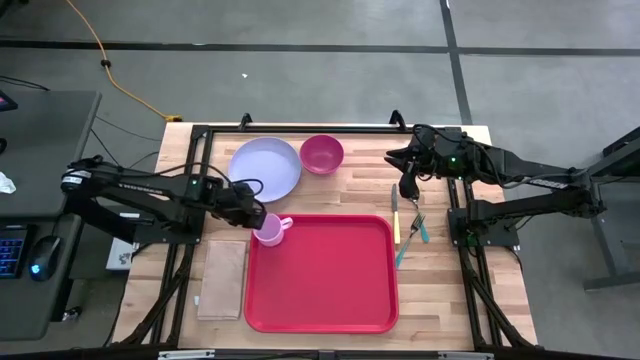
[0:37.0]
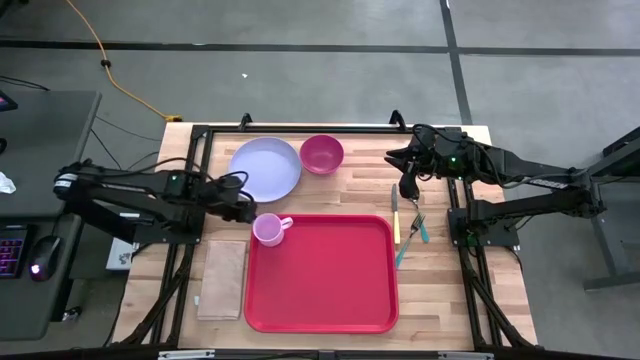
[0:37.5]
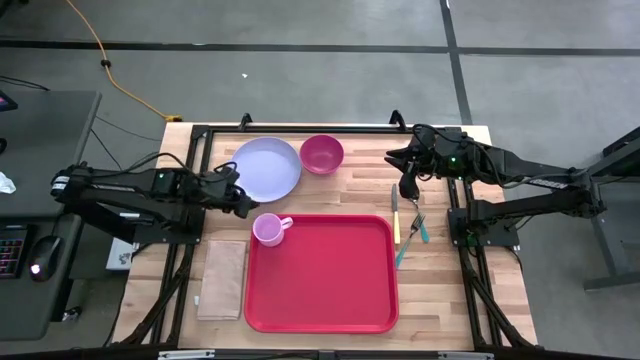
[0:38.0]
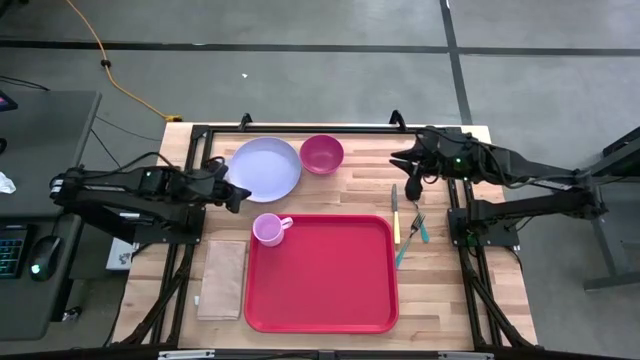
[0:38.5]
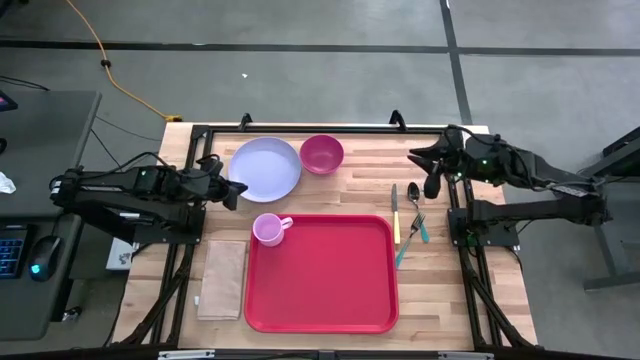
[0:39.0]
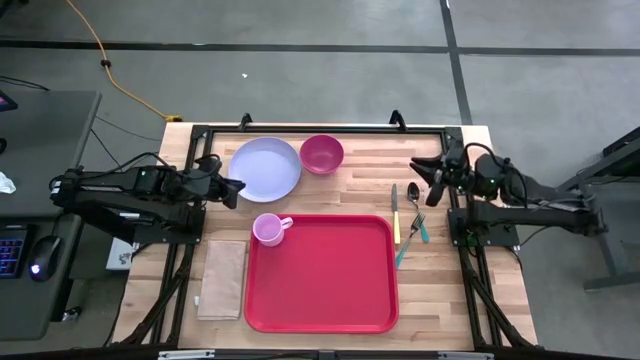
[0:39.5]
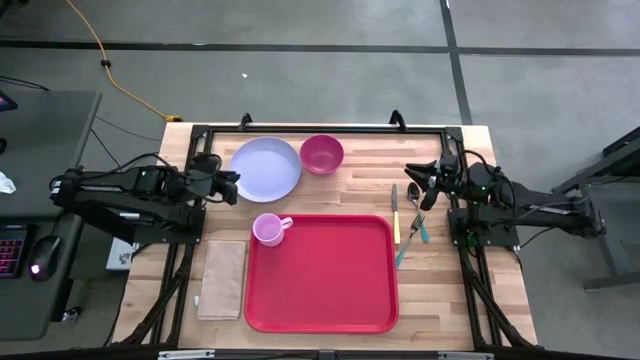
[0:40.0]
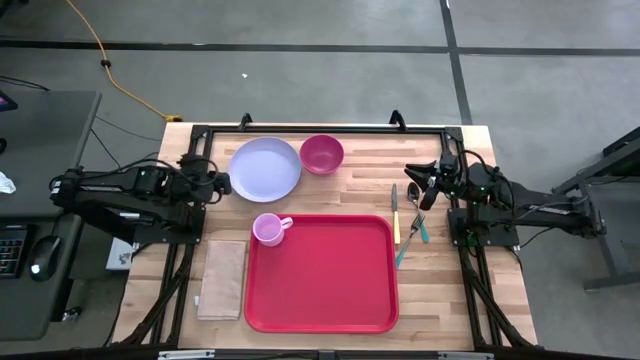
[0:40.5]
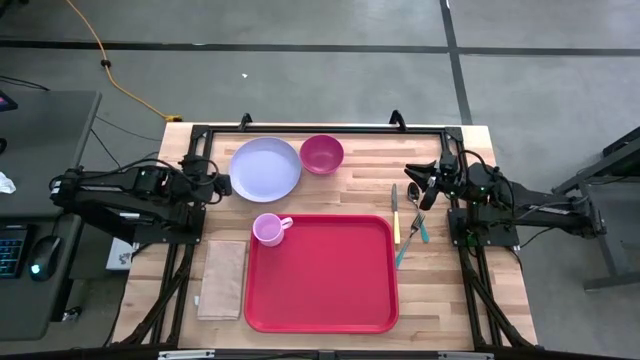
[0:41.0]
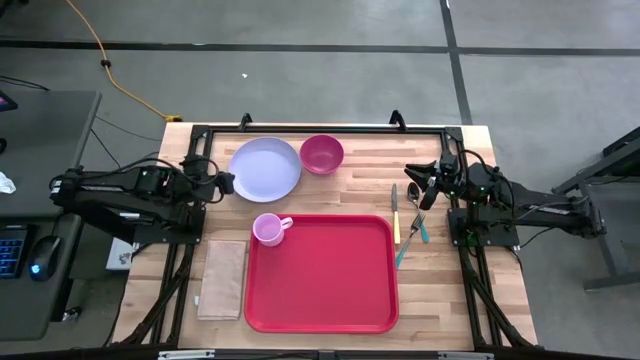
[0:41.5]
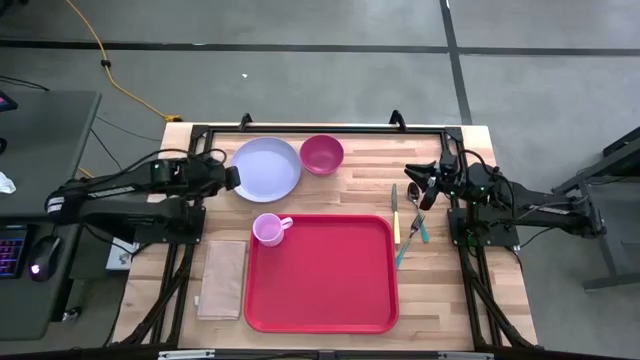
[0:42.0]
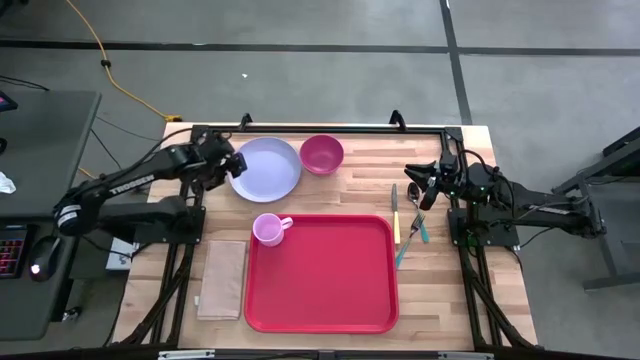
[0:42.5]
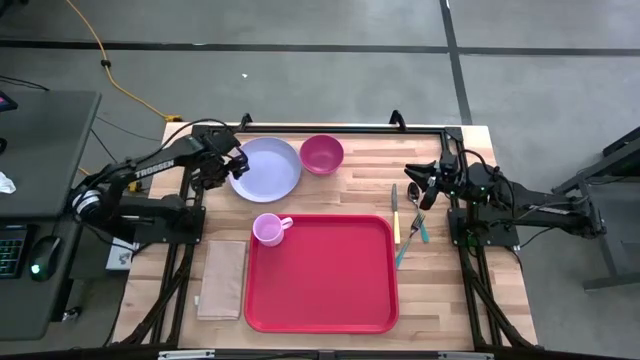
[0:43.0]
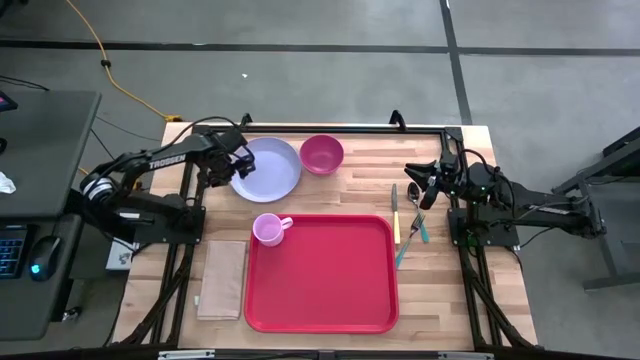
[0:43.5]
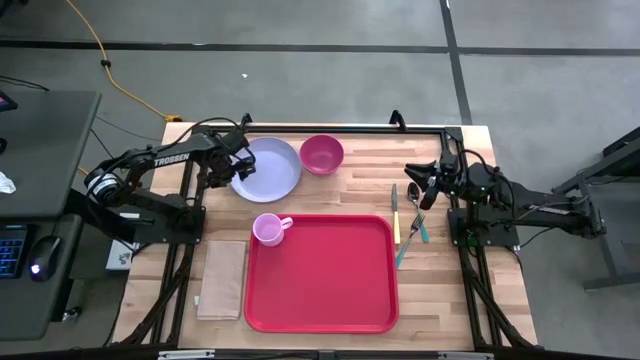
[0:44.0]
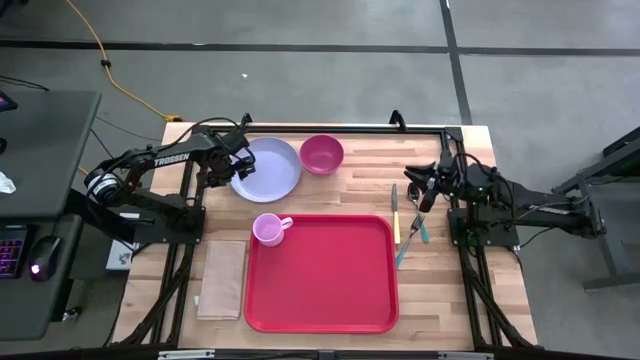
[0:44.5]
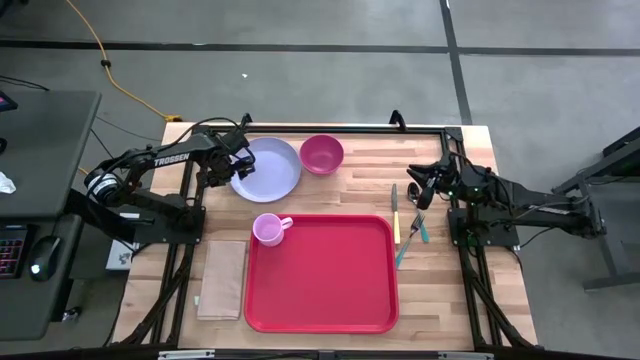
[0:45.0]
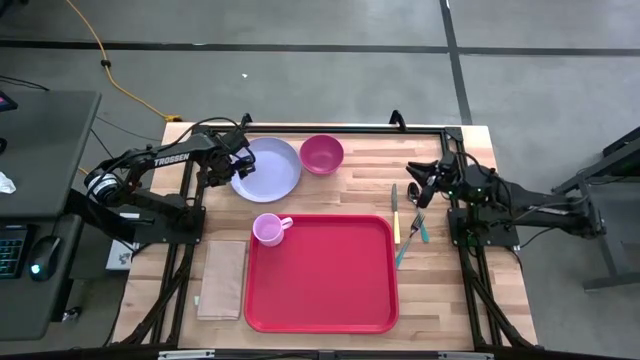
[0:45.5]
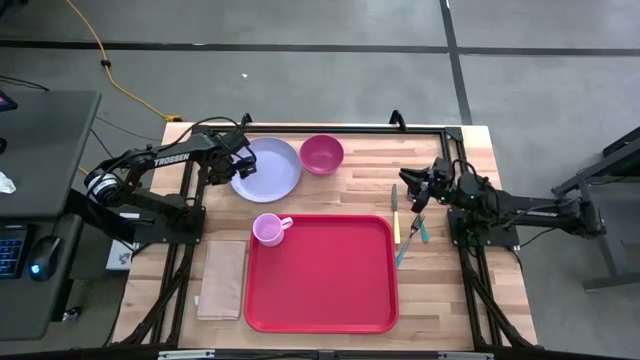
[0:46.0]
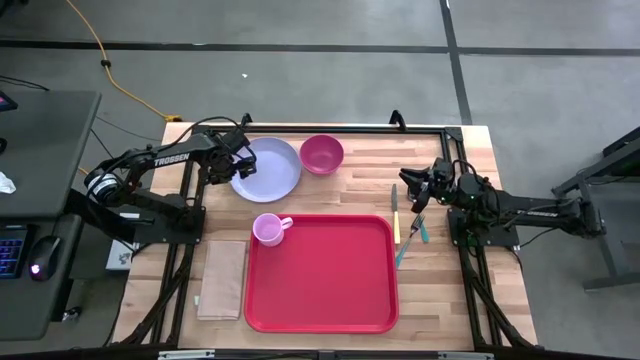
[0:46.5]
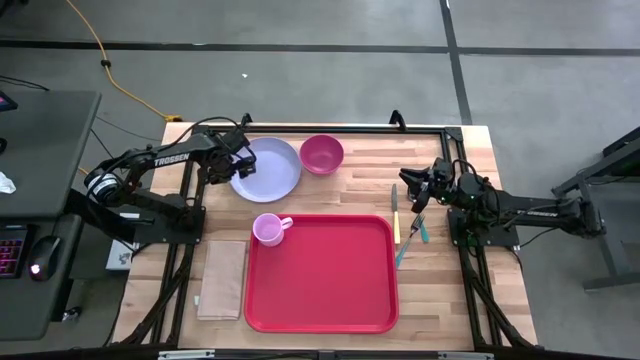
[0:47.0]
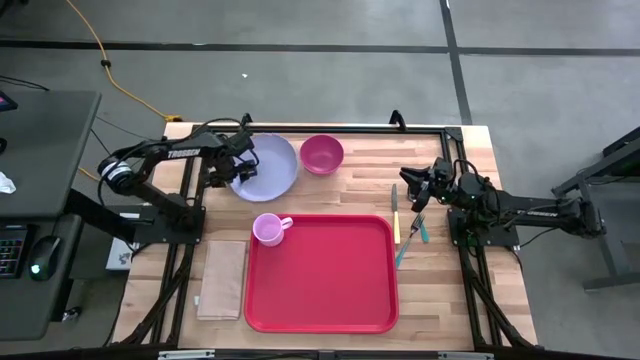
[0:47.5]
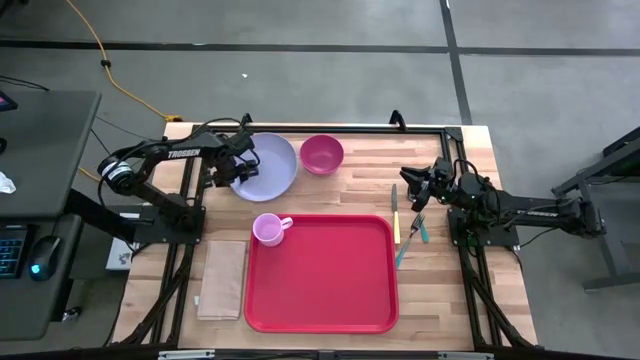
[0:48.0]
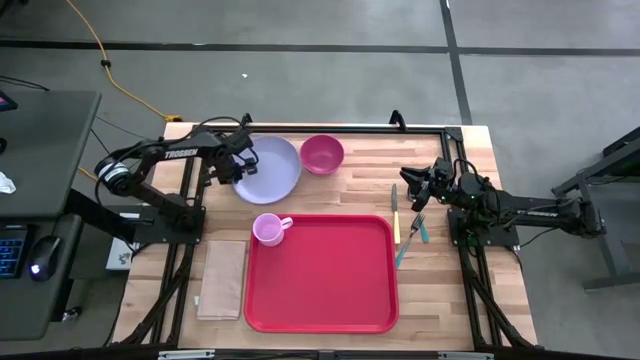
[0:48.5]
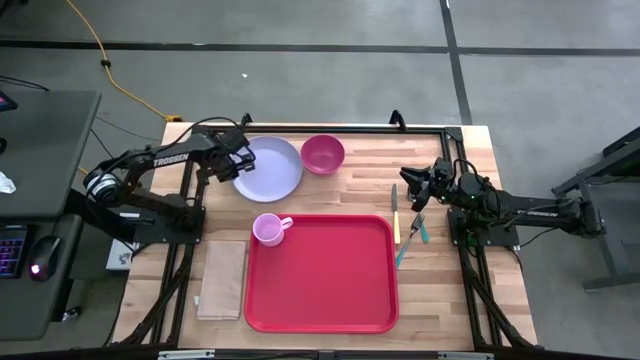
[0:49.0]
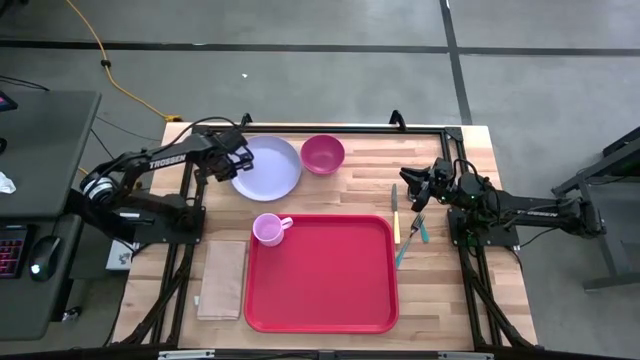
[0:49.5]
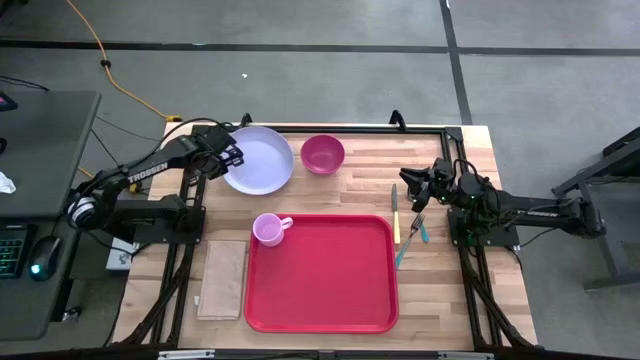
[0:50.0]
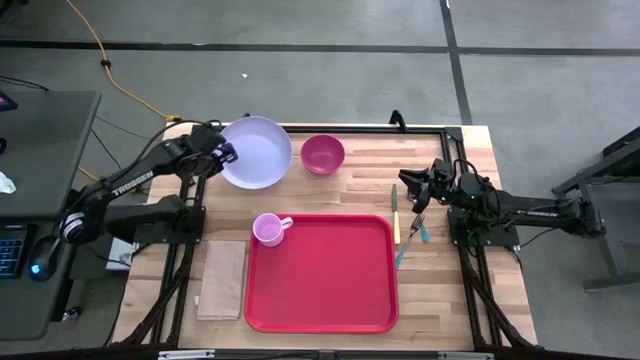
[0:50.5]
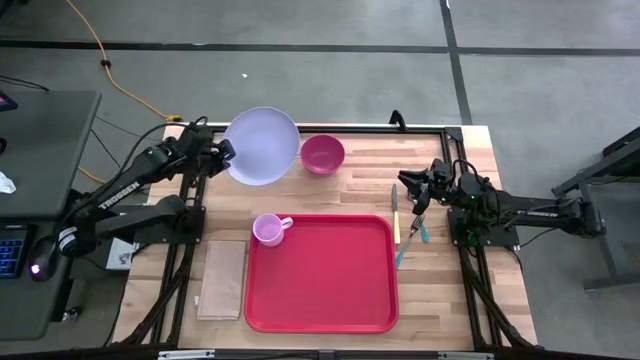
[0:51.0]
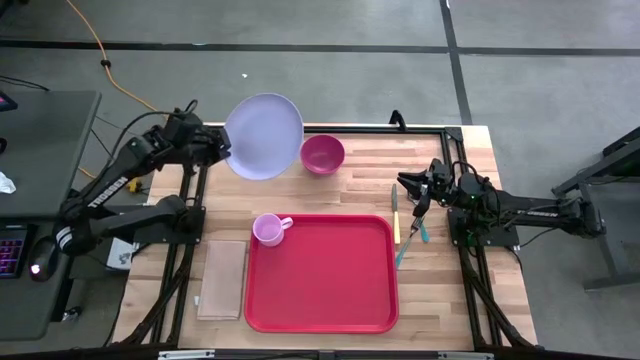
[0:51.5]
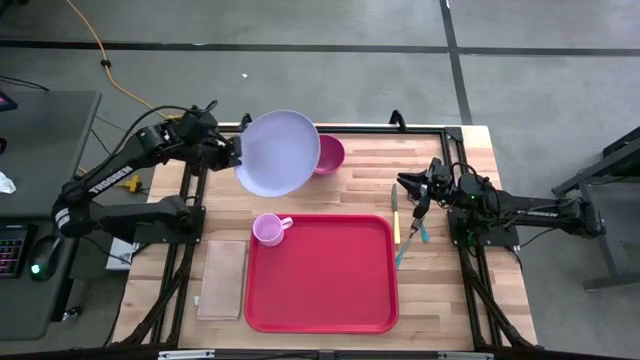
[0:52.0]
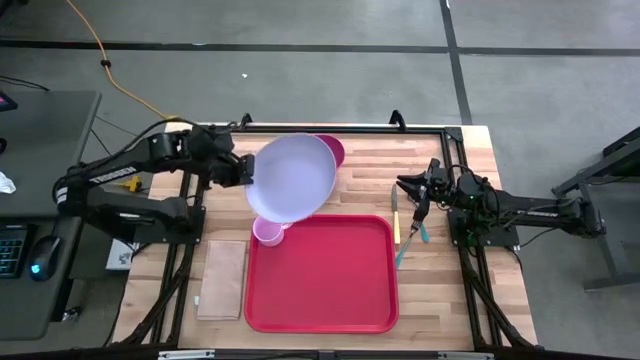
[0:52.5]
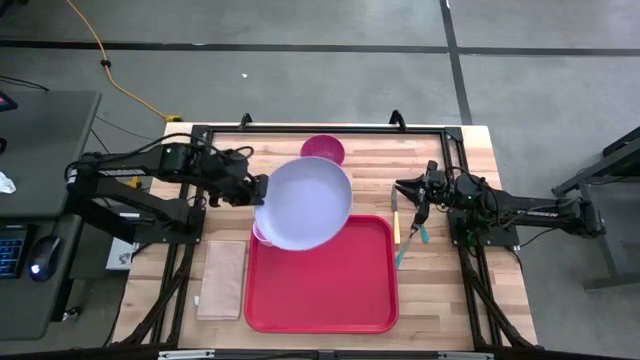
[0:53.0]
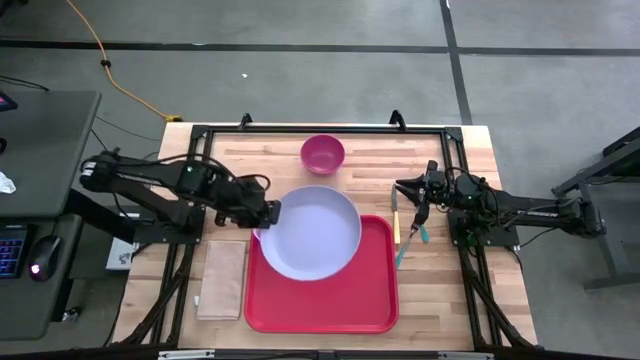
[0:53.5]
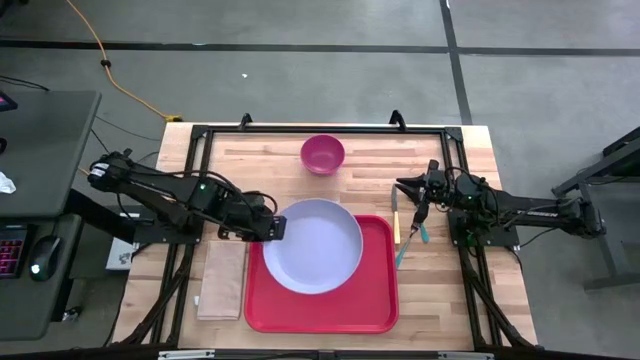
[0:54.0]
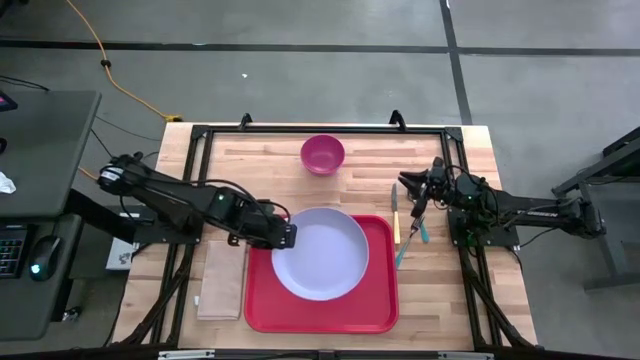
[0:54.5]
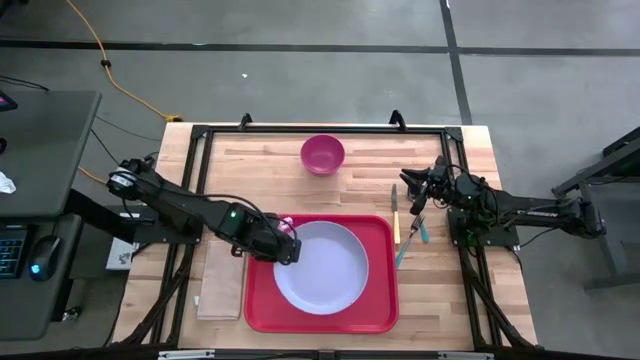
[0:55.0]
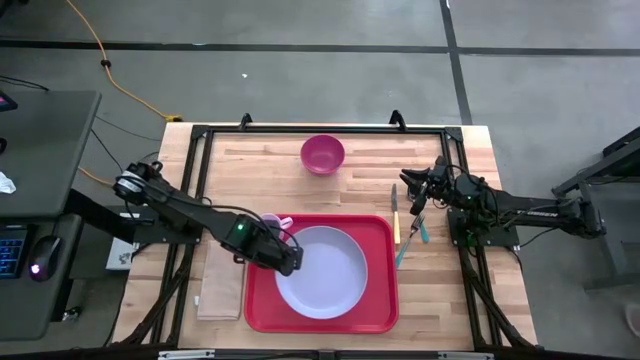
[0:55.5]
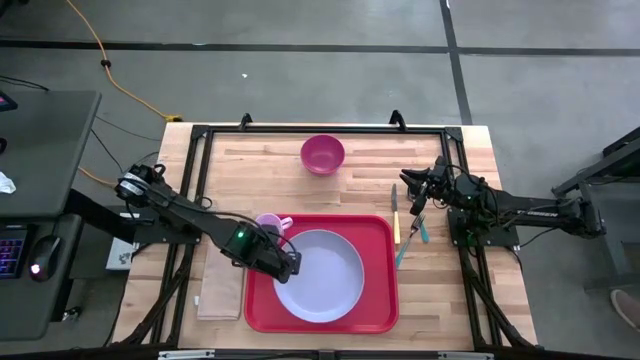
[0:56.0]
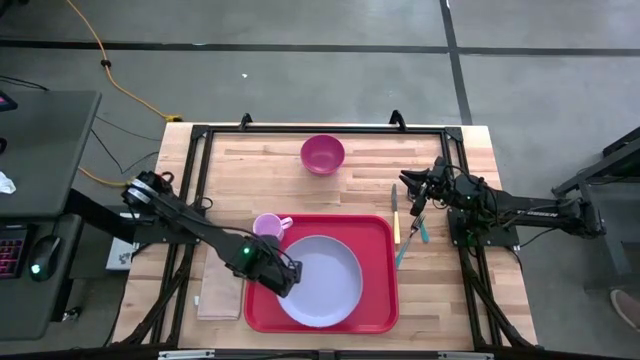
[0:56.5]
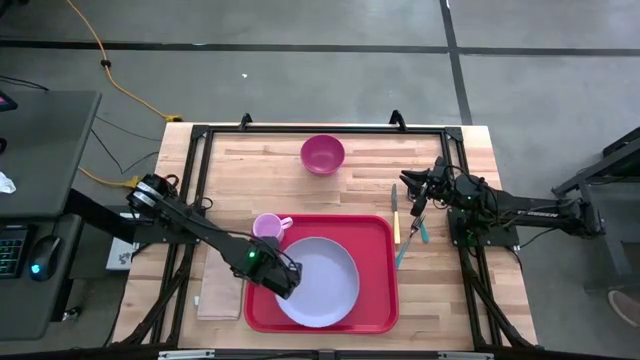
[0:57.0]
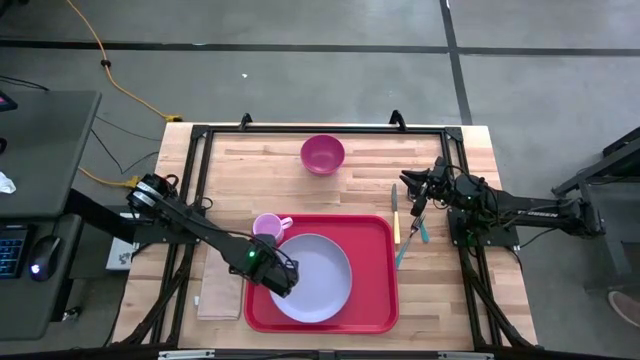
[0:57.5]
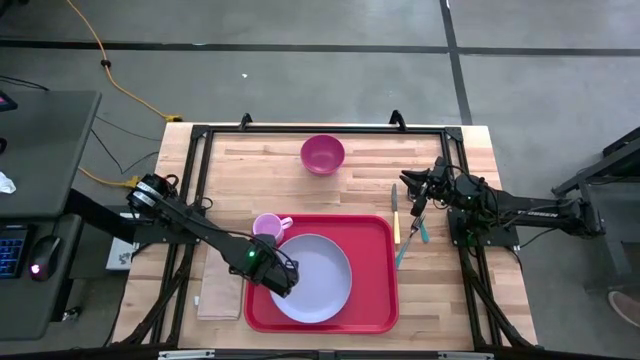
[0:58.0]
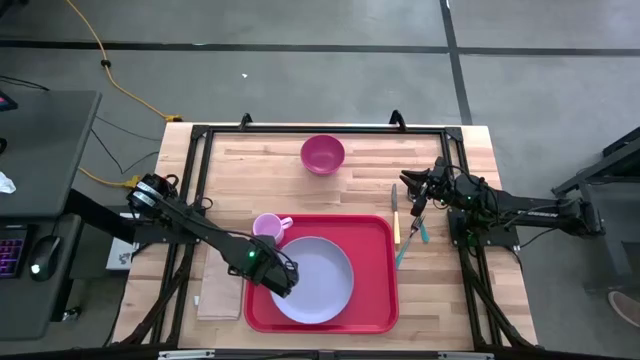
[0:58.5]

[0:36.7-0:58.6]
Task: Set up tray
Put the purple plate on the red serving tray to the bottom right of the pink mug
